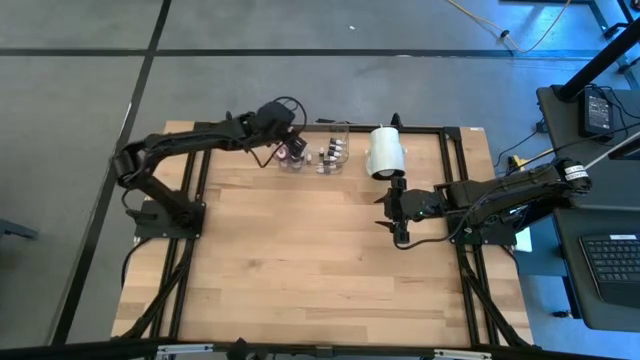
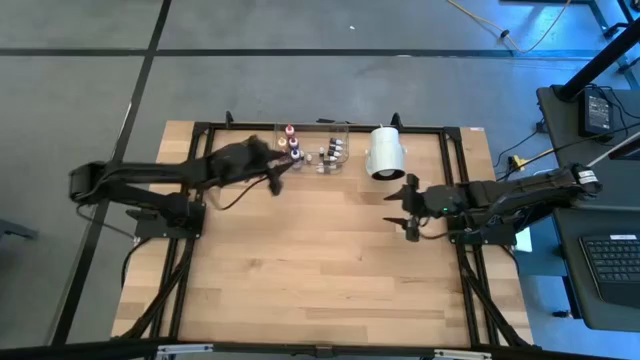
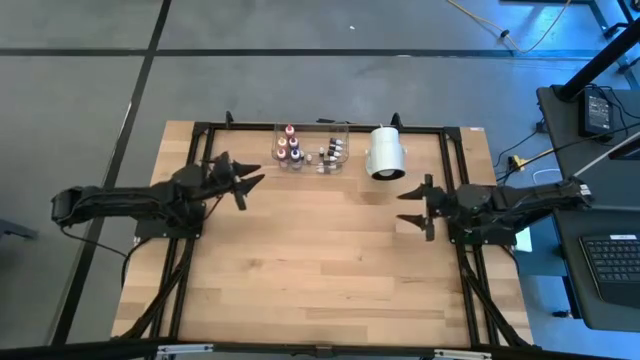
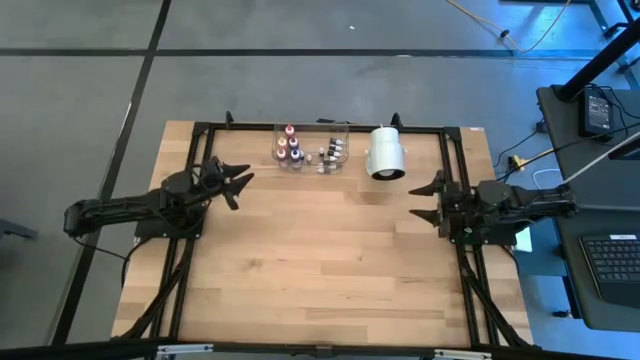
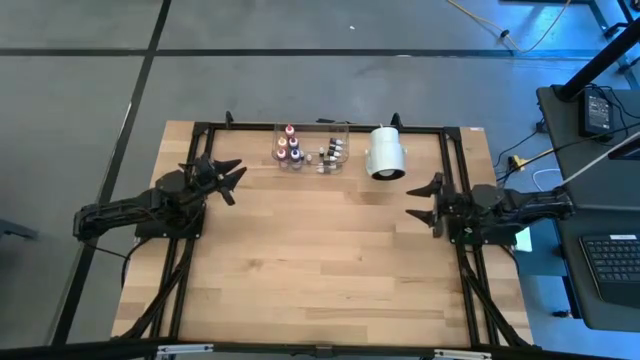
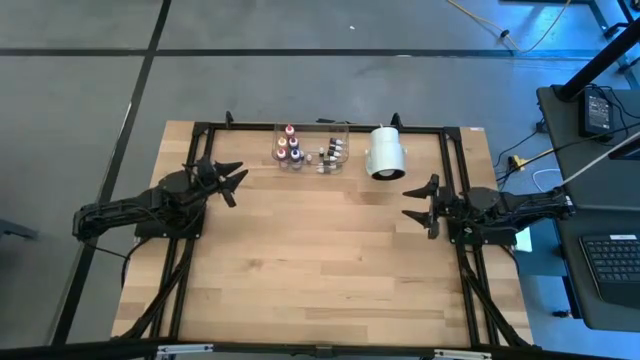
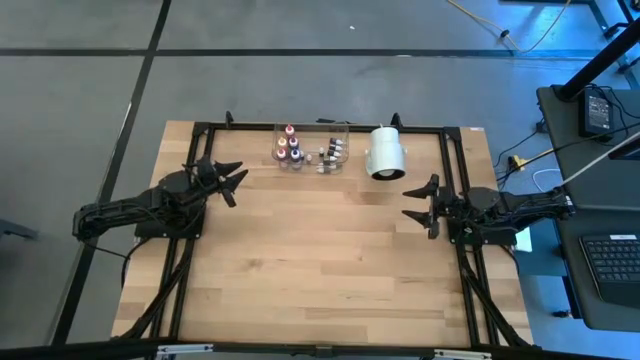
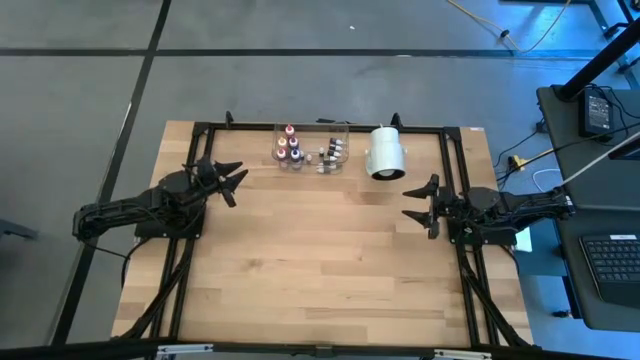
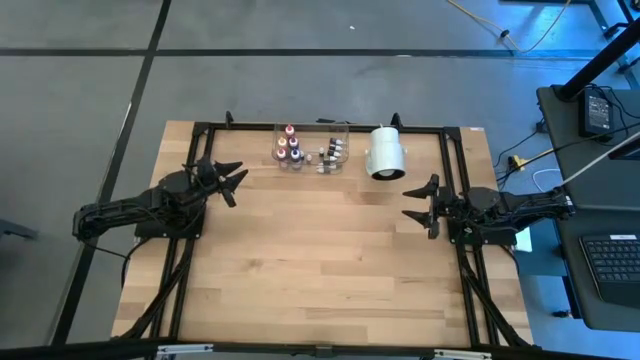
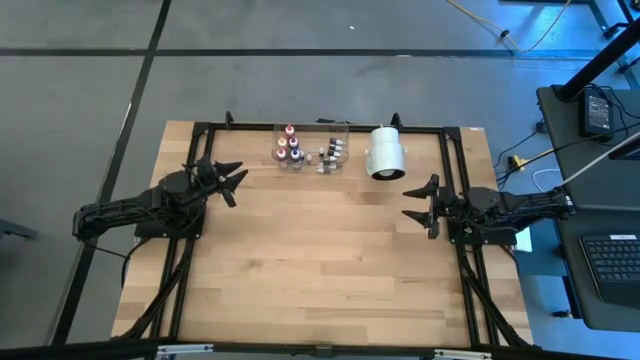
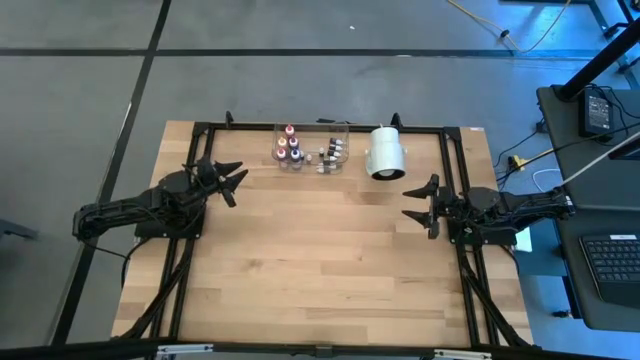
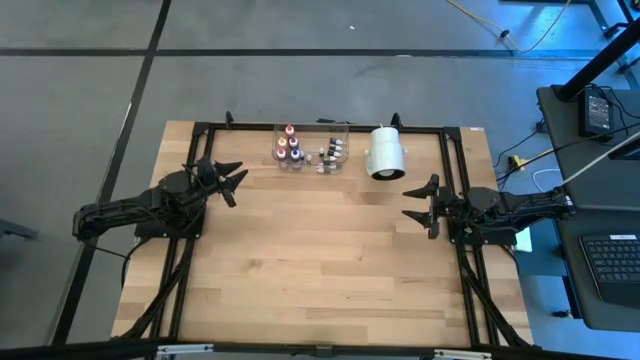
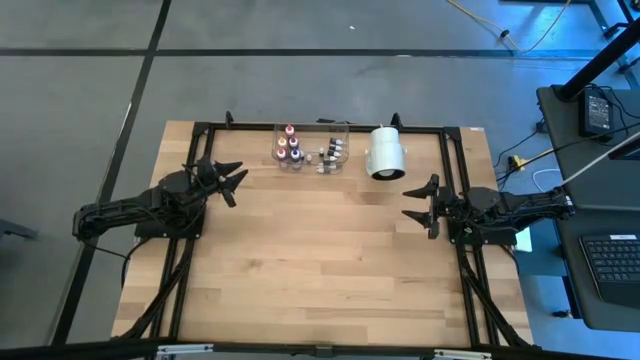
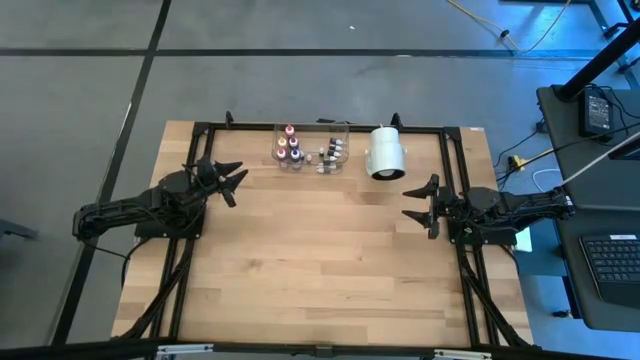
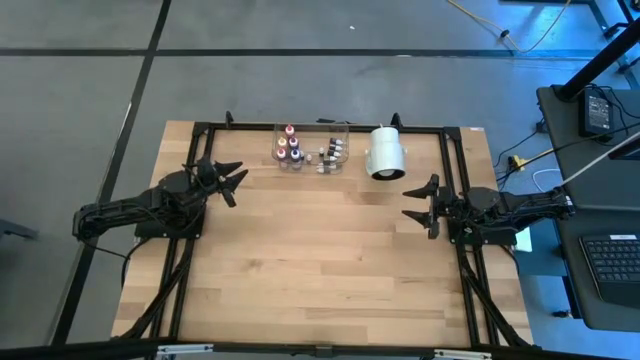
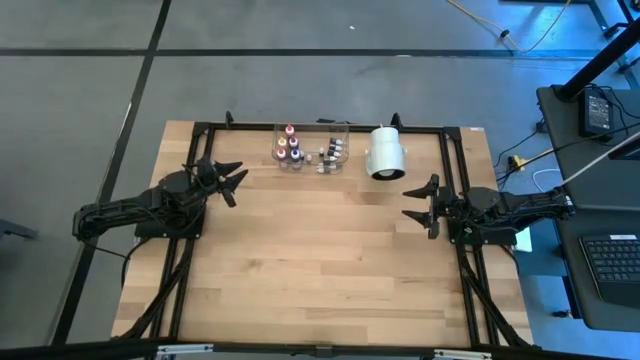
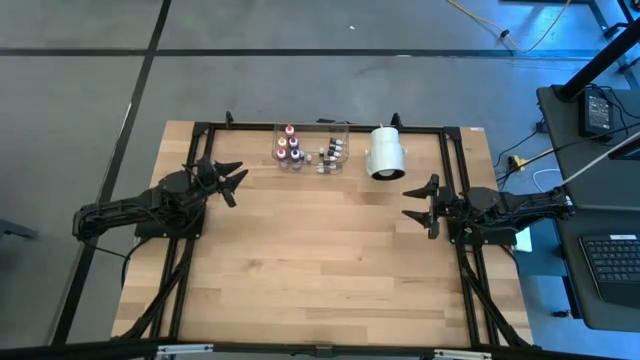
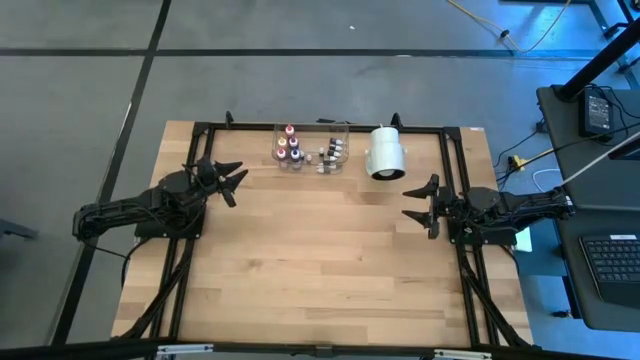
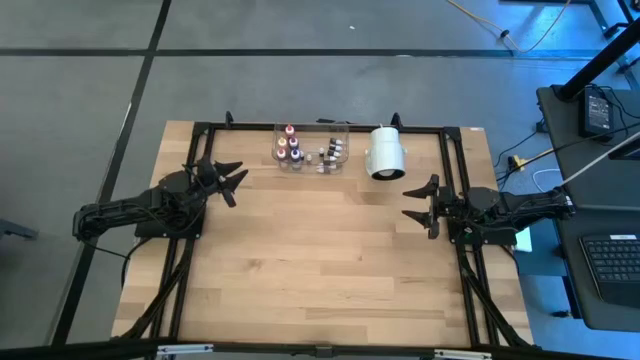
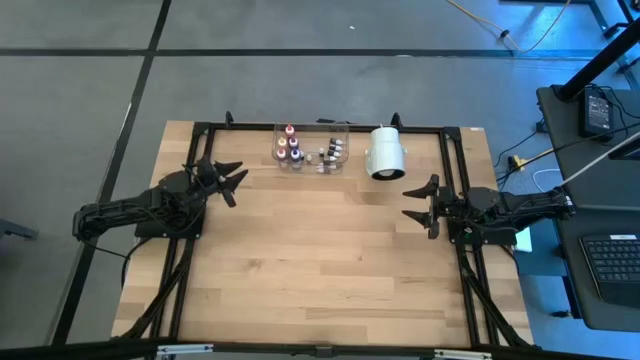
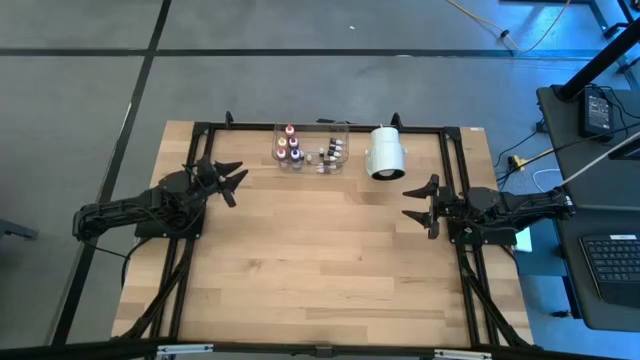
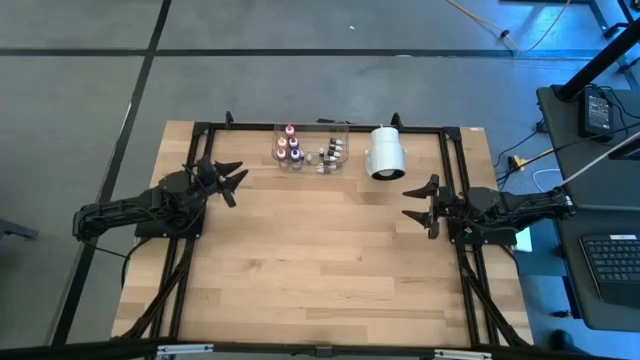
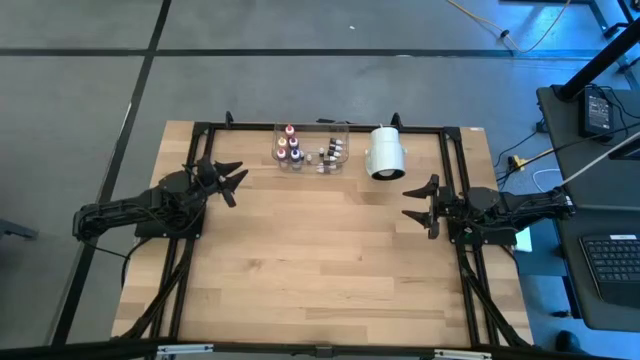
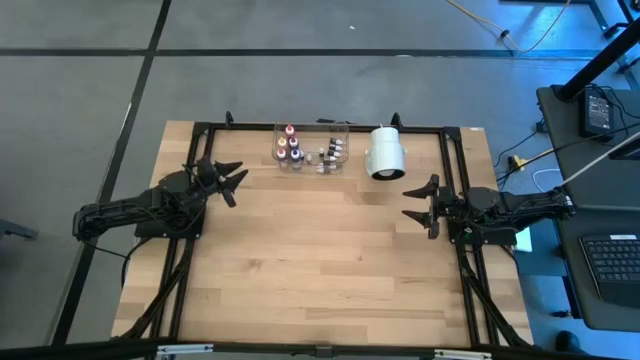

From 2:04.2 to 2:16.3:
Task: Pick & Place food coloring
Return to Home Position

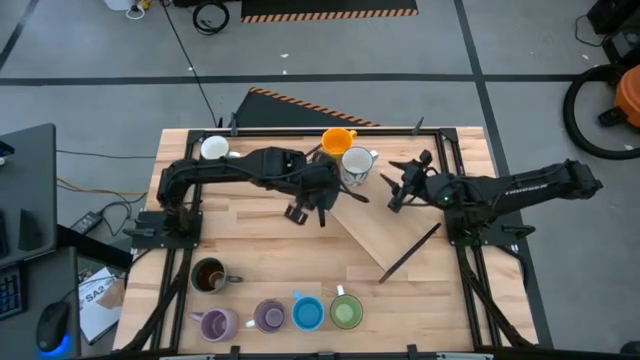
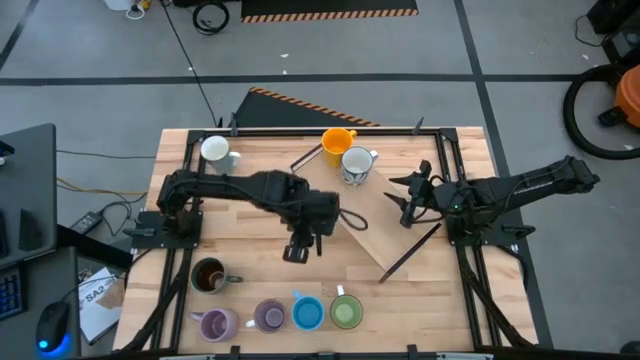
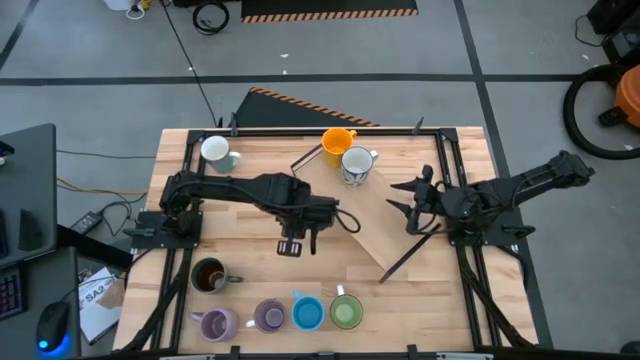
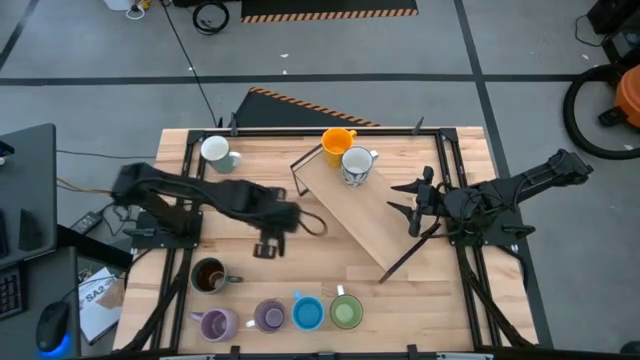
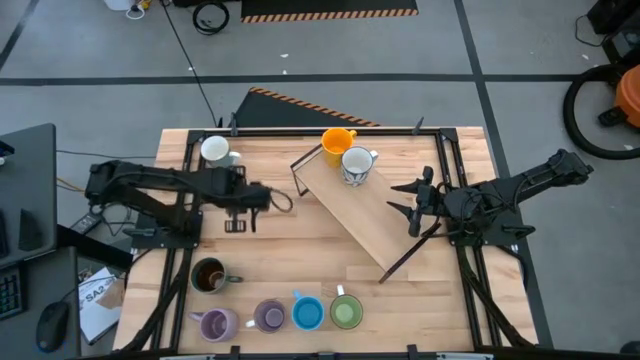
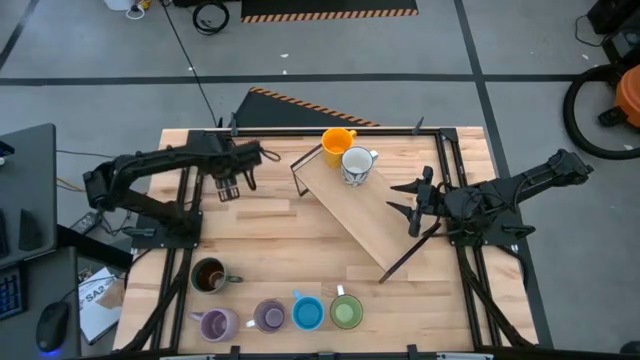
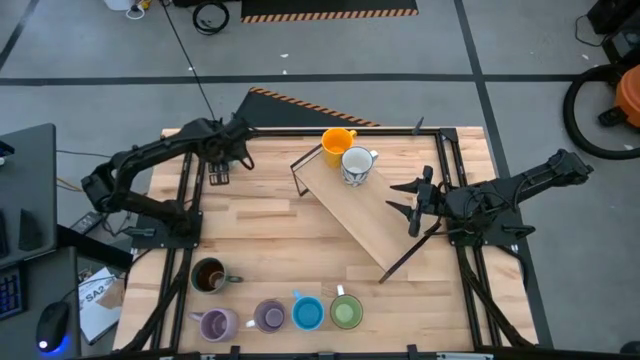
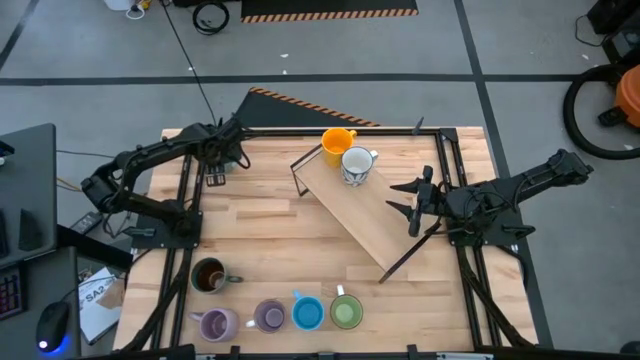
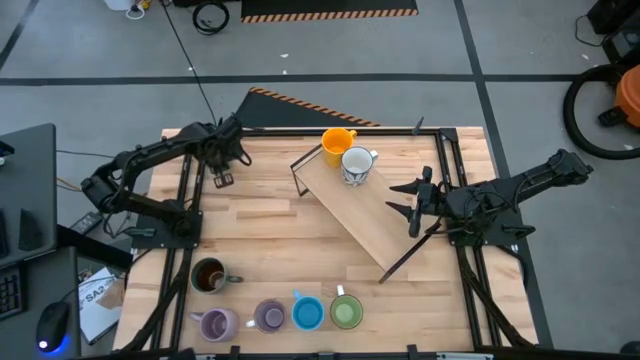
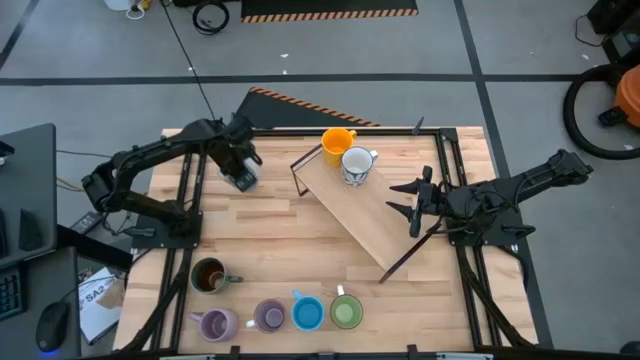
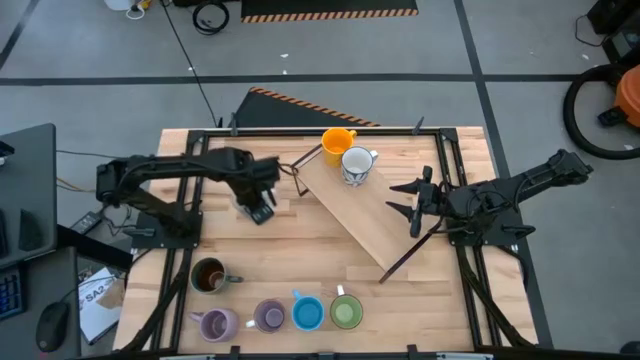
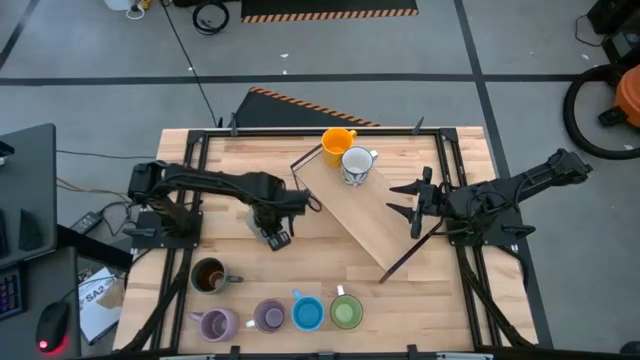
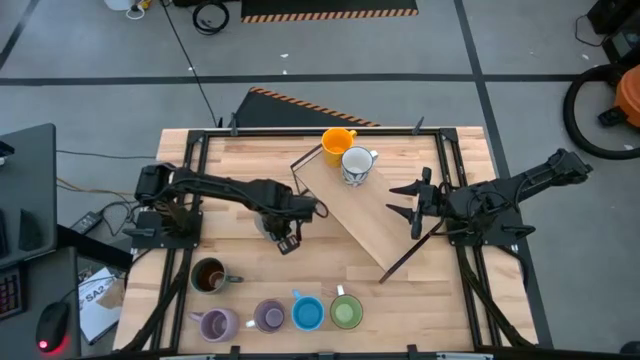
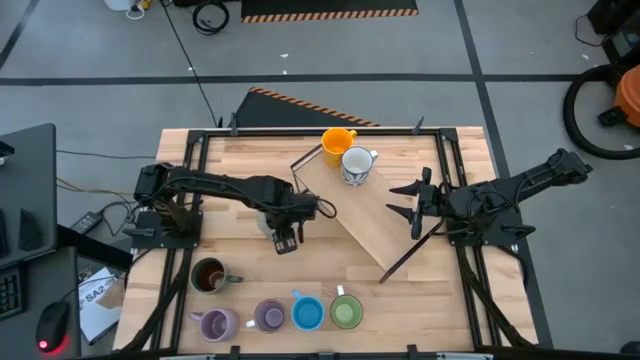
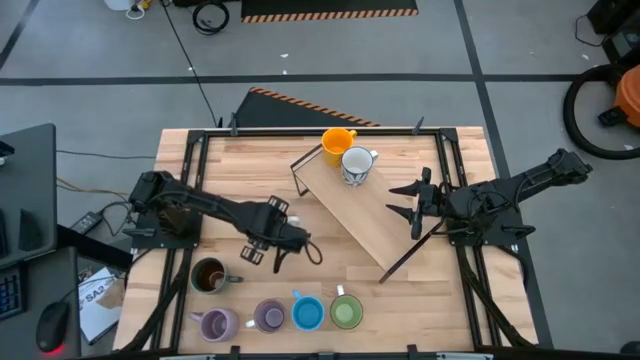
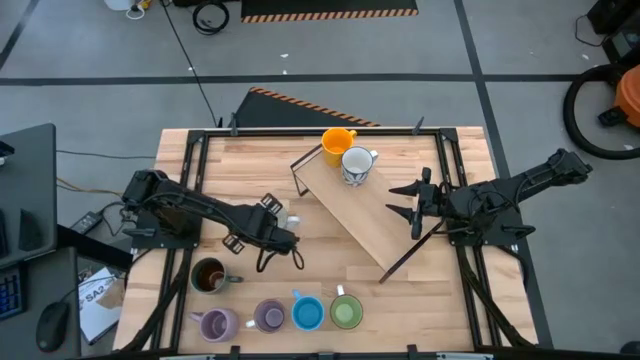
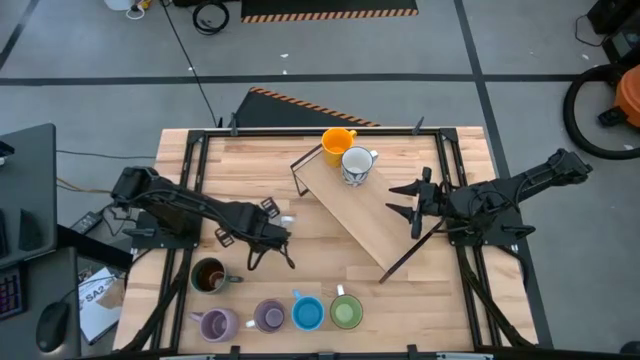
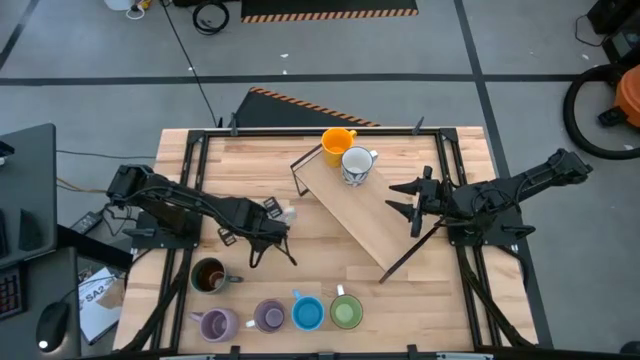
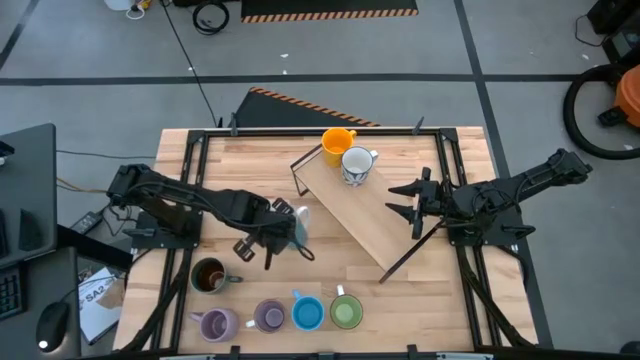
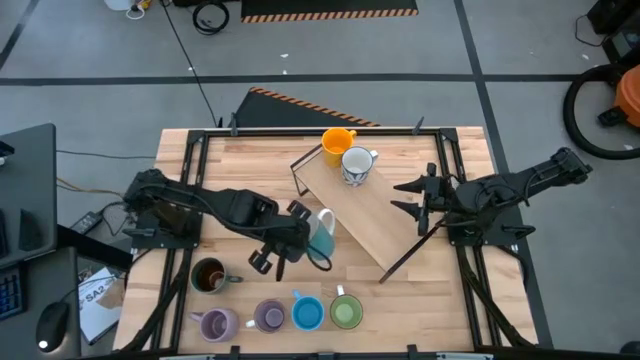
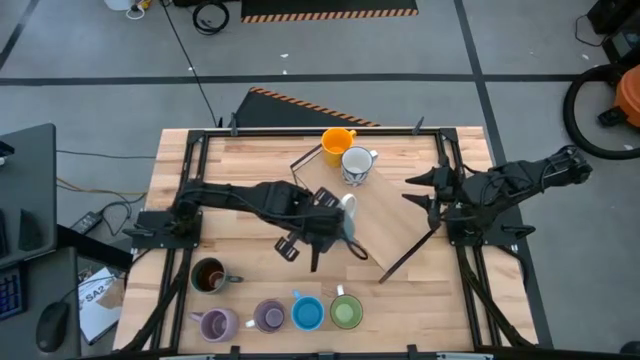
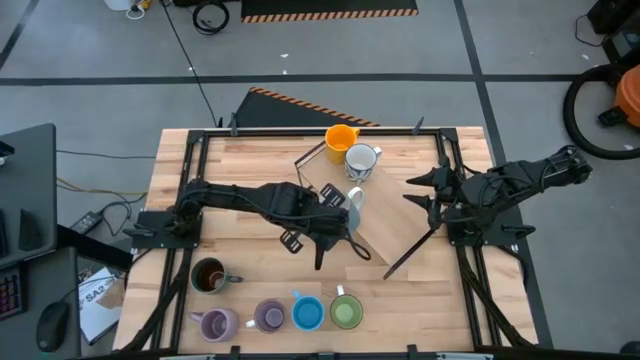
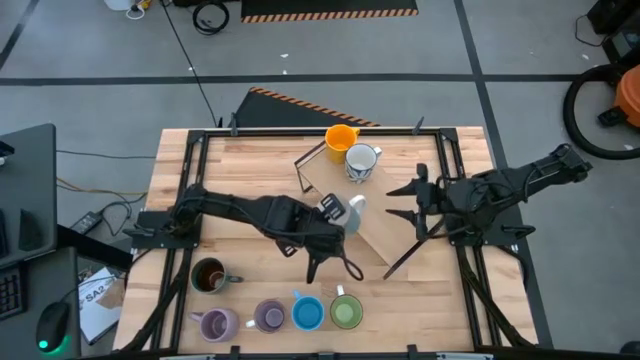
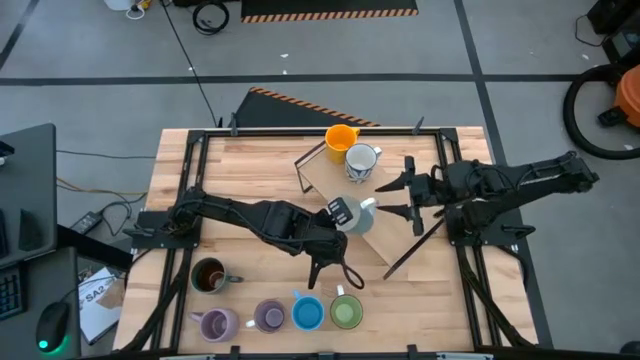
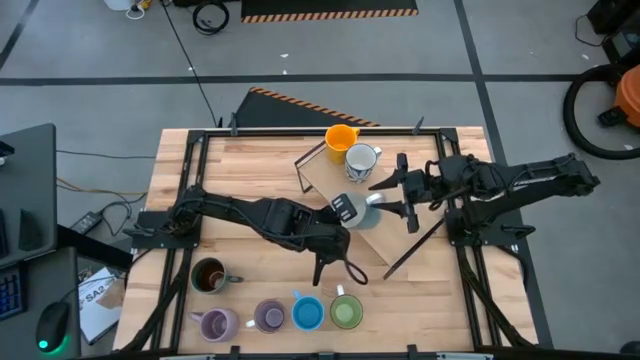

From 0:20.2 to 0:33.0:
Task: Place coffee mugs
Put the light blue mug on the shelf
